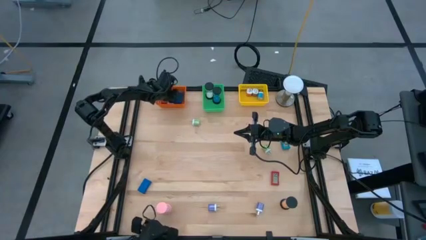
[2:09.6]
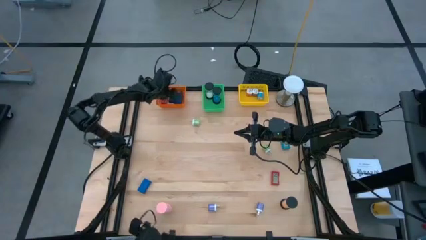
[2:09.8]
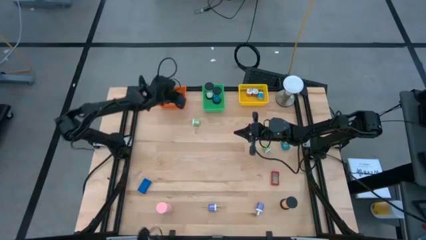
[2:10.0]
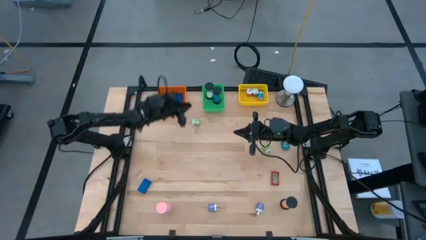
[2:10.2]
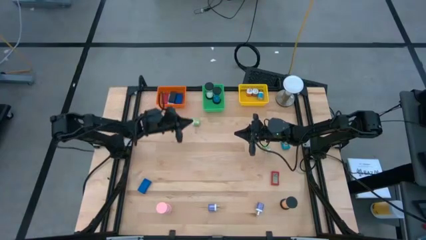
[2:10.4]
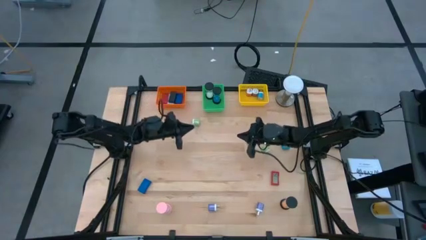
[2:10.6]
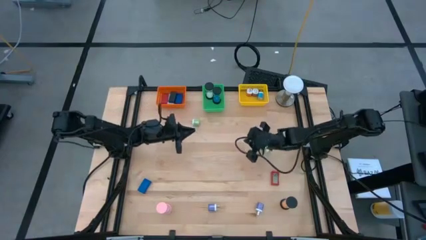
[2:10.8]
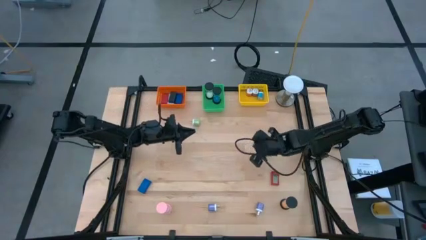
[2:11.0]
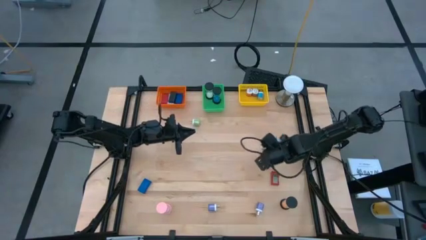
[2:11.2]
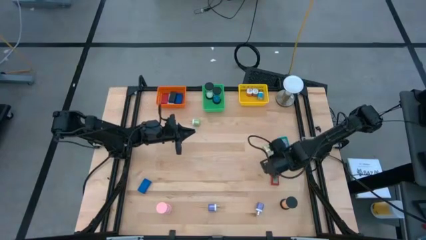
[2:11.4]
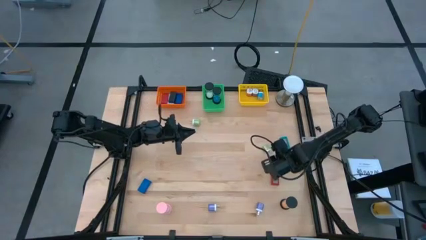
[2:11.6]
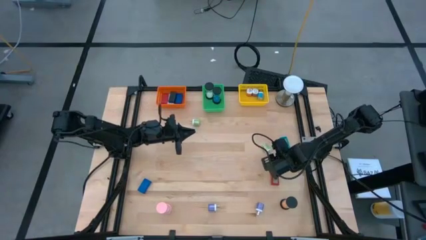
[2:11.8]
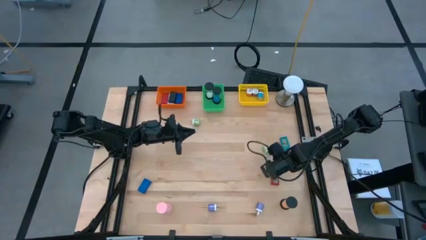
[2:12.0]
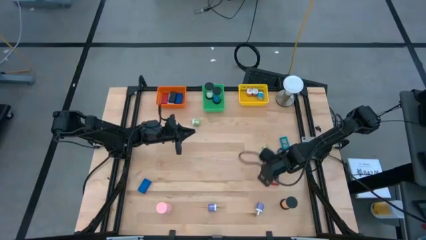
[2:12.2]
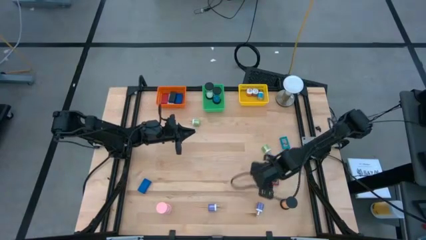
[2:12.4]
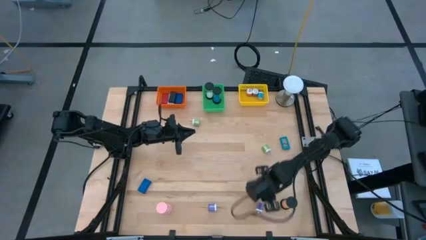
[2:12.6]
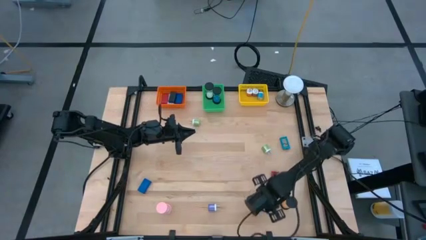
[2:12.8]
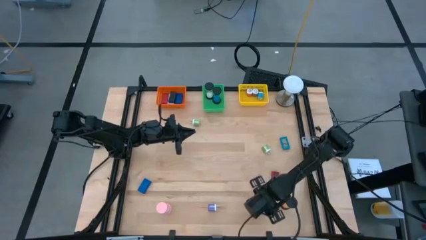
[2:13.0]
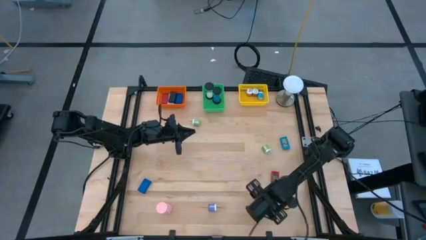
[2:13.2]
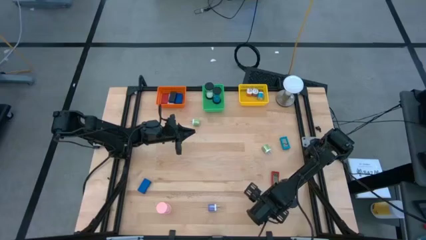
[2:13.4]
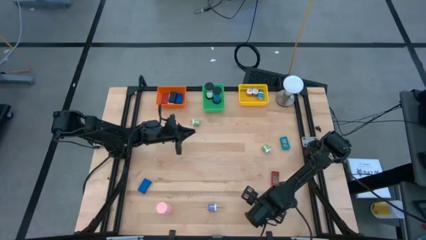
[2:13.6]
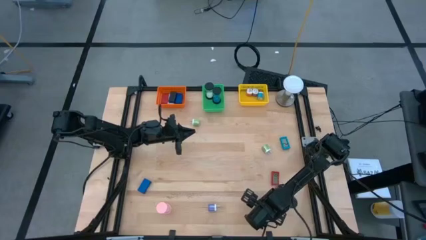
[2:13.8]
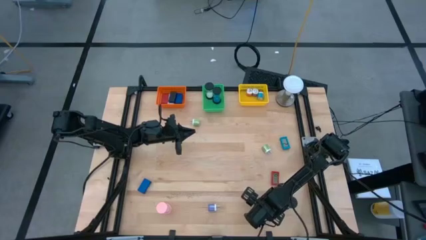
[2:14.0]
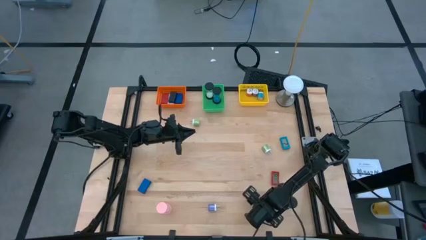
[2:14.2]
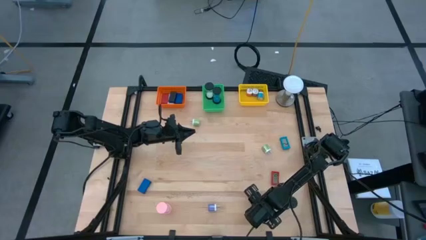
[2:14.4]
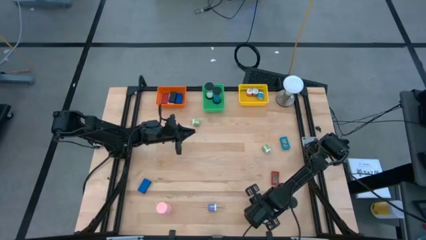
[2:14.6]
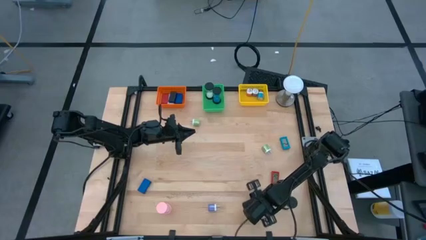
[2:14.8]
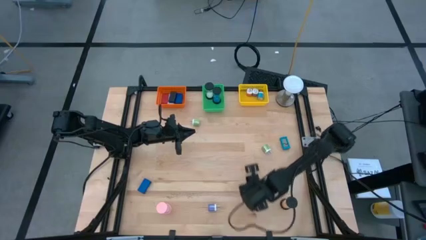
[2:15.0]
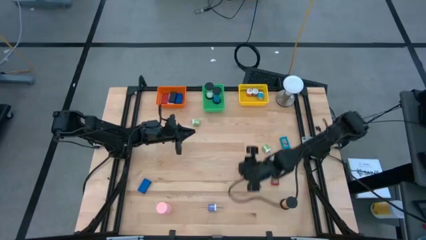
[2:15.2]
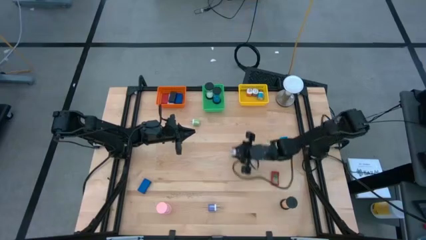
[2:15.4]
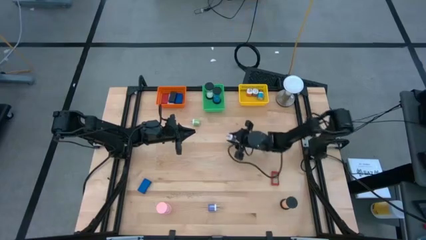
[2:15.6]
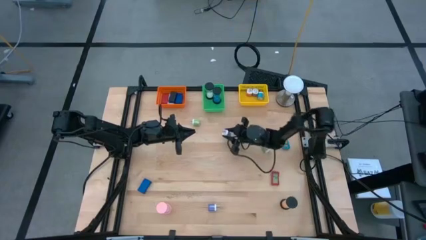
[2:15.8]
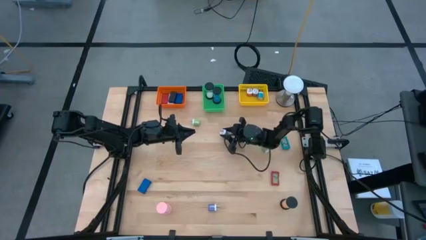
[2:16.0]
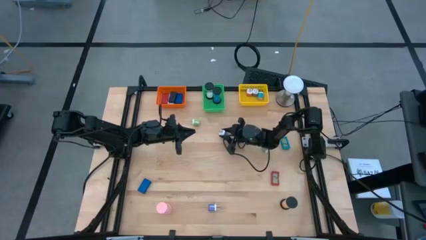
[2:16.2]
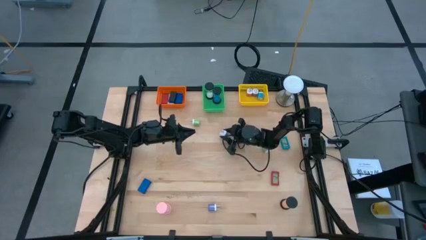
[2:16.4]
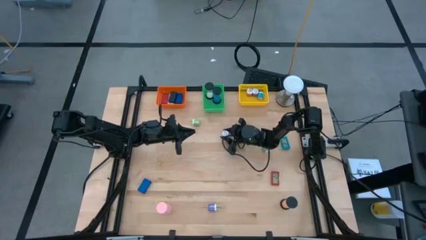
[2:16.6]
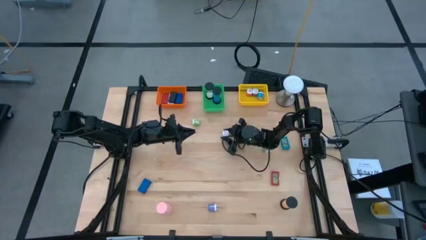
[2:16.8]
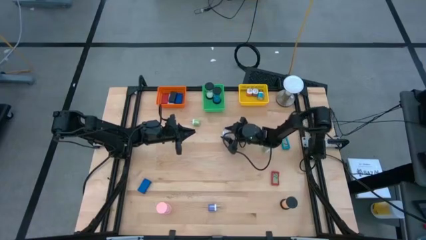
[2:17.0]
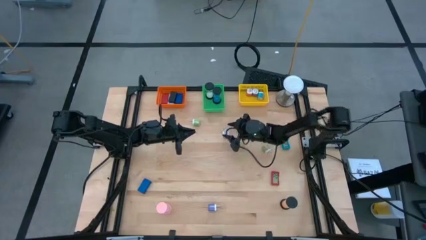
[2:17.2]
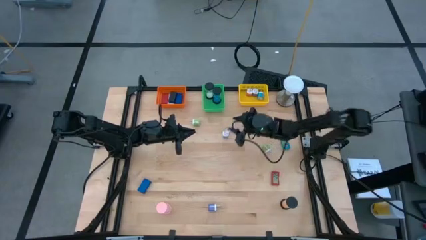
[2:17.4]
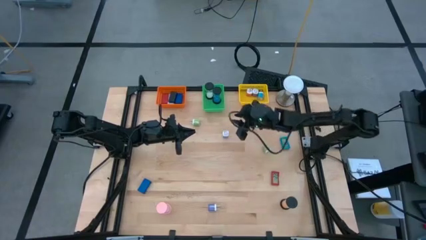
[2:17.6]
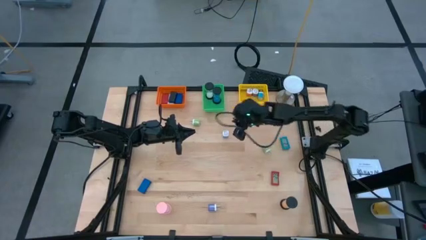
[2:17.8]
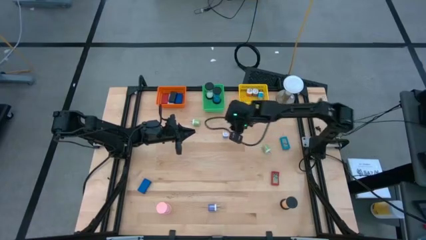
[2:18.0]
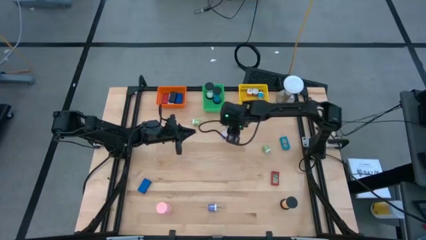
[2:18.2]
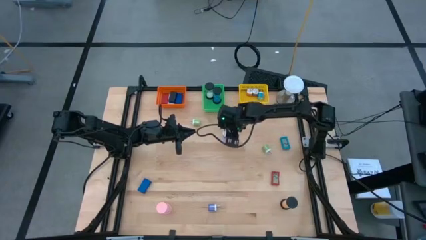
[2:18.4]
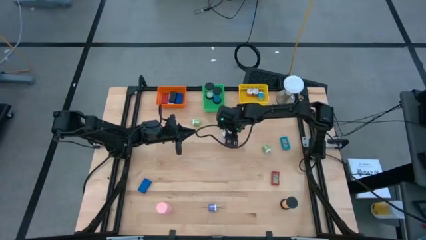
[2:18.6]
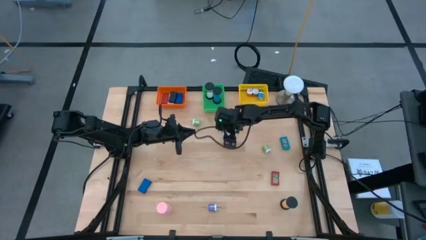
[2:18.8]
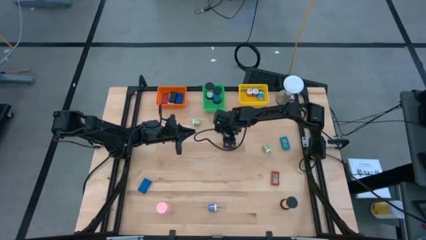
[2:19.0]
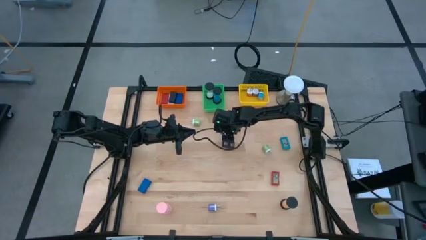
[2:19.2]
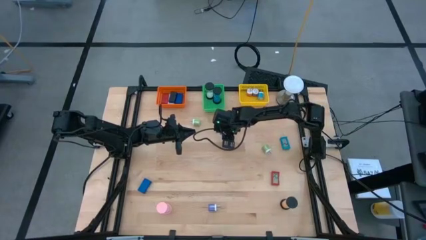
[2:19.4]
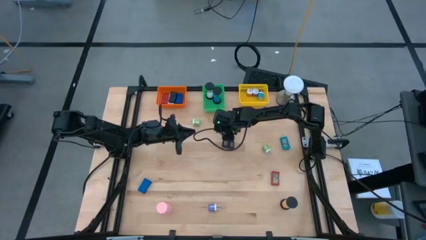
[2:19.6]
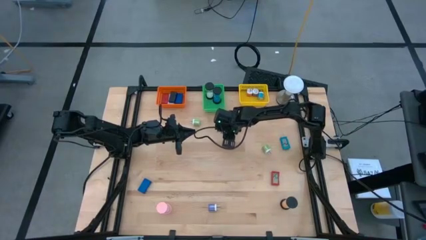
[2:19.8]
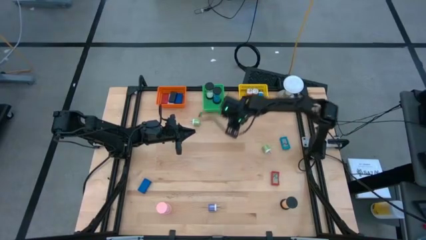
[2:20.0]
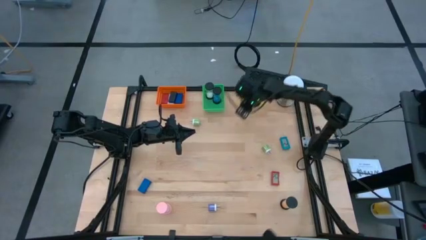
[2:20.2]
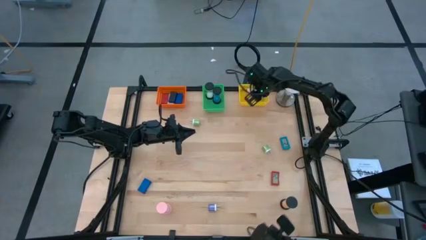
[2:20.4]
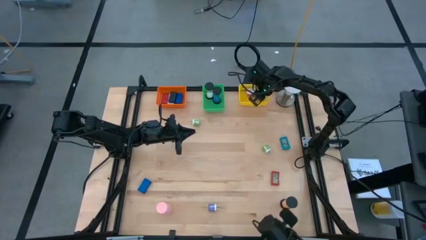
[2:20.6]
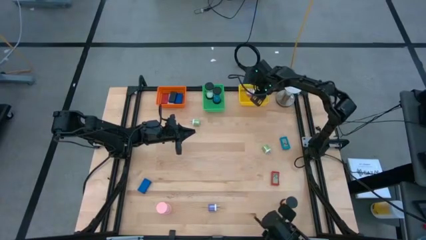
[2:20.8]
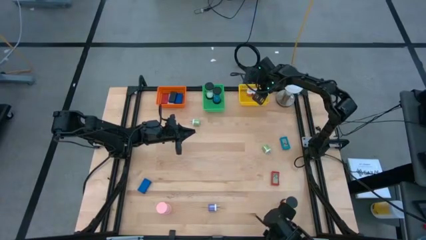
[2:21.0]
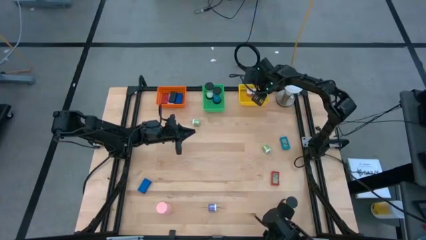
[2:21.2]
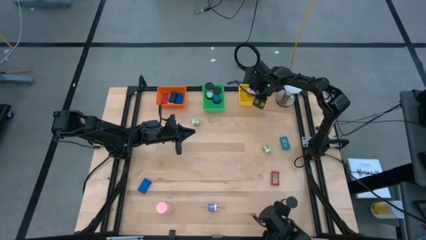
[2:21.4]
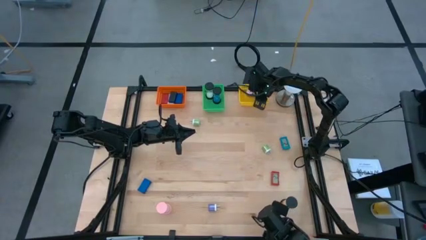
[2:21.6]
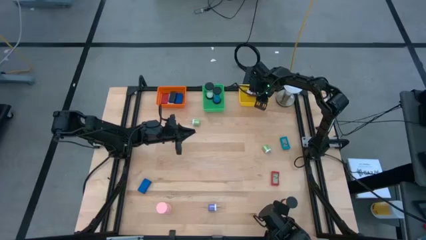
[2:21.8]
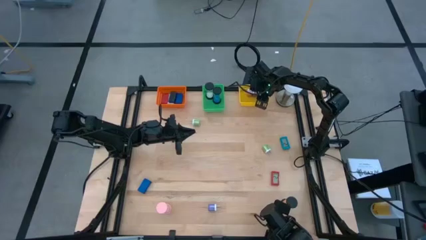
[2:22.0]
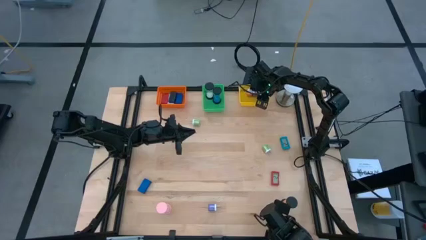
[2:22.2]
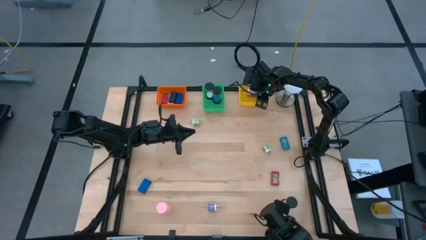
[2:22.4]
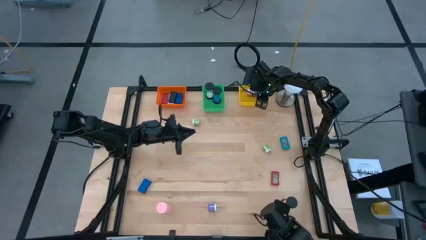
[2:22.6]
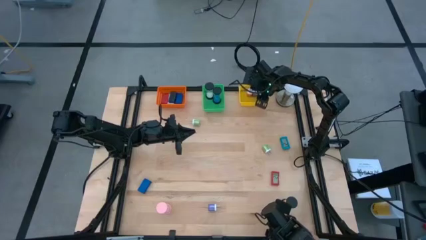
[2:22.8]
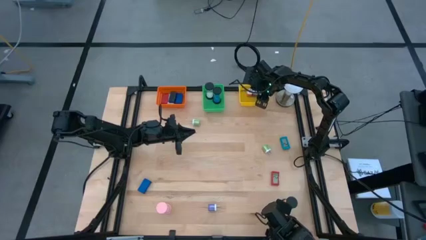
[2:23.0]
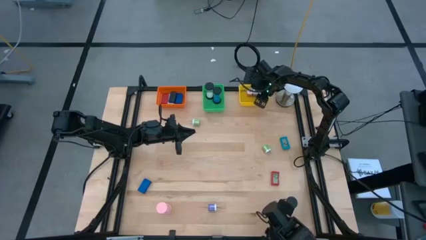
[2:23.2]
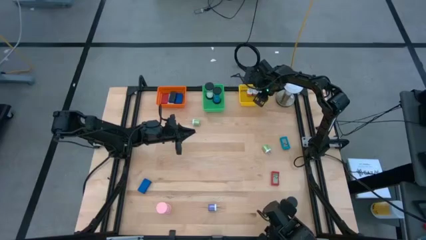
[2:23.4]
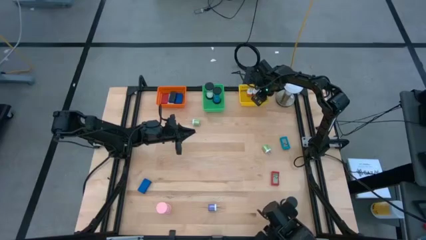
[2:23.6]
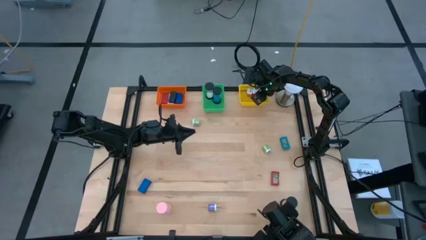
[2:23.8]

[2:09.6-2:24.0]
Task: Pick & Place Office items
Put the right purple charger adapter into the yellow bin
